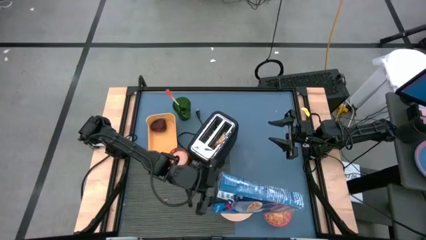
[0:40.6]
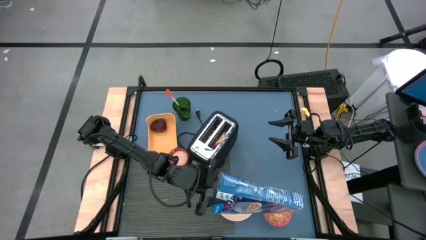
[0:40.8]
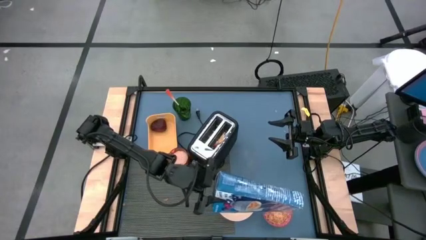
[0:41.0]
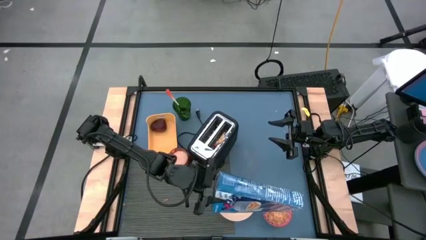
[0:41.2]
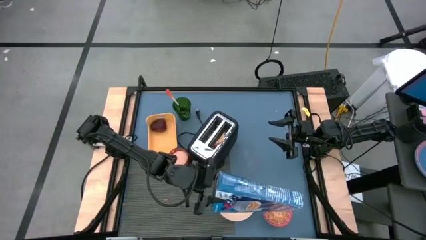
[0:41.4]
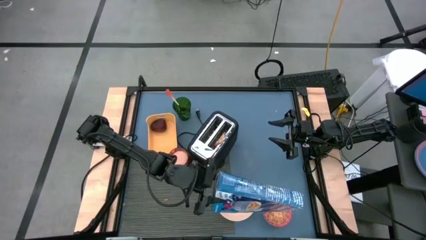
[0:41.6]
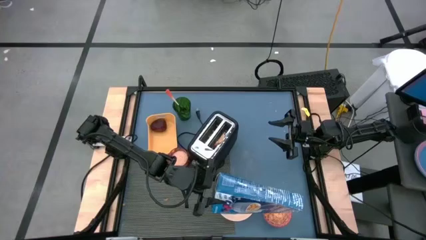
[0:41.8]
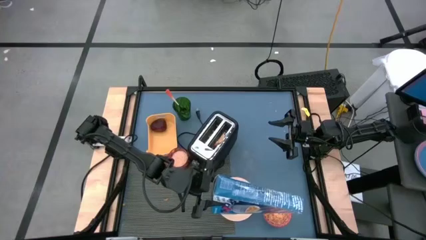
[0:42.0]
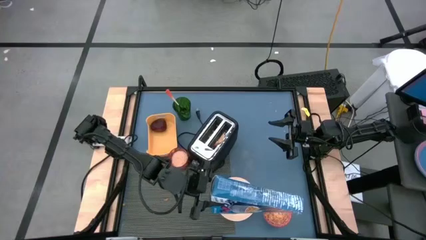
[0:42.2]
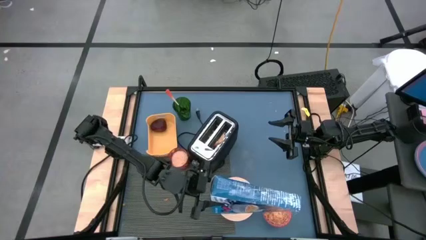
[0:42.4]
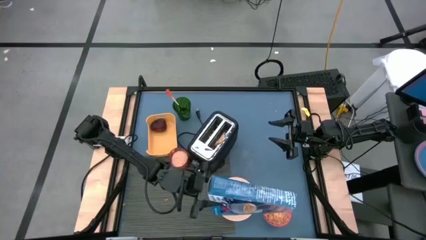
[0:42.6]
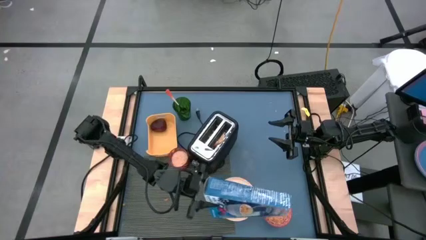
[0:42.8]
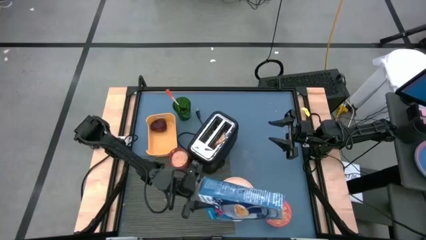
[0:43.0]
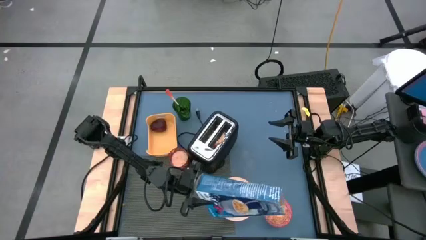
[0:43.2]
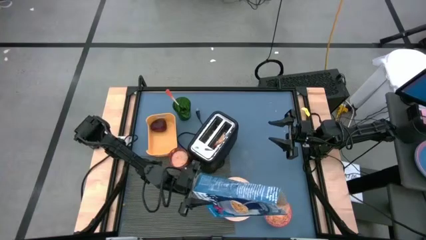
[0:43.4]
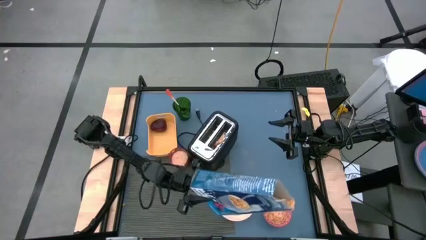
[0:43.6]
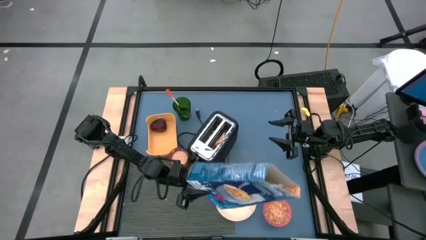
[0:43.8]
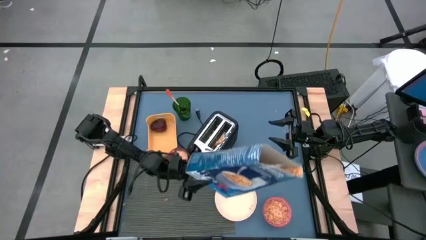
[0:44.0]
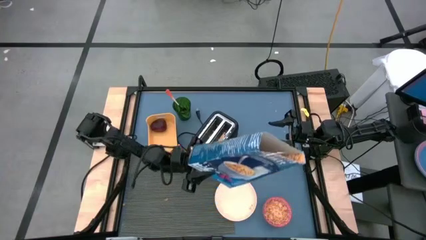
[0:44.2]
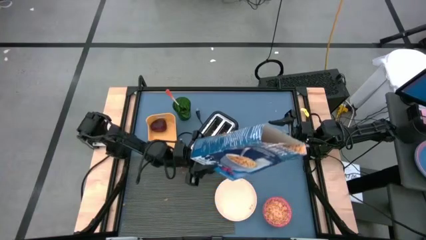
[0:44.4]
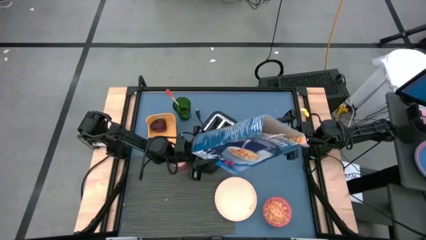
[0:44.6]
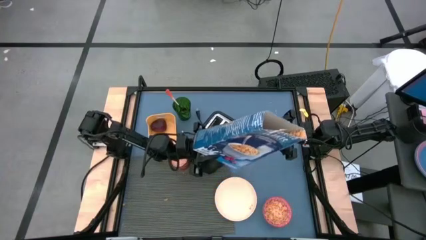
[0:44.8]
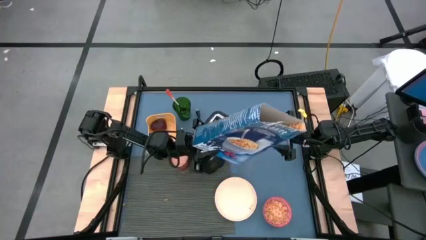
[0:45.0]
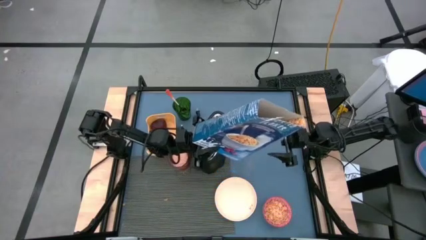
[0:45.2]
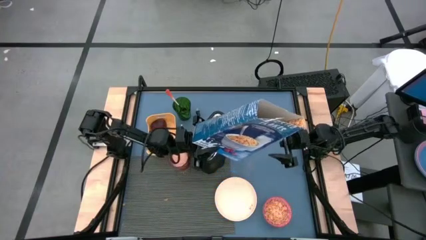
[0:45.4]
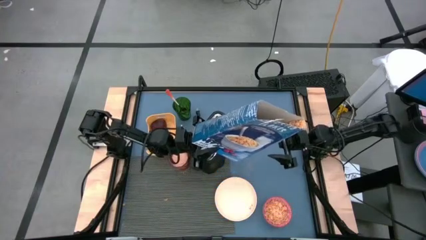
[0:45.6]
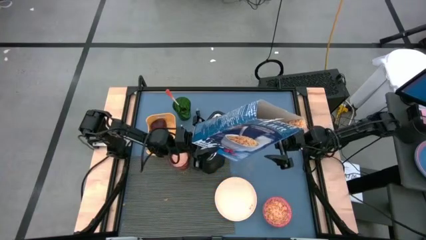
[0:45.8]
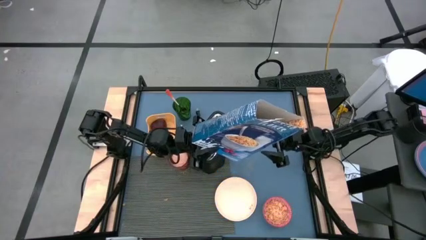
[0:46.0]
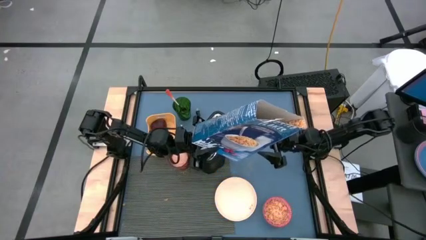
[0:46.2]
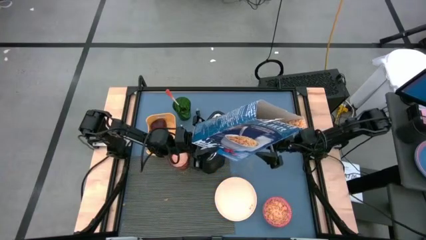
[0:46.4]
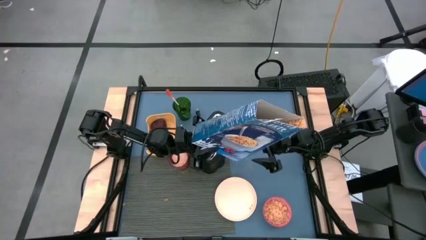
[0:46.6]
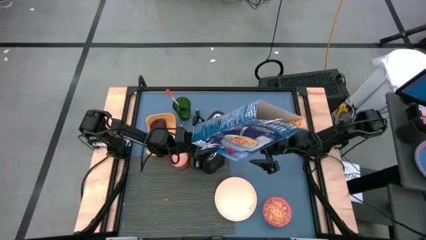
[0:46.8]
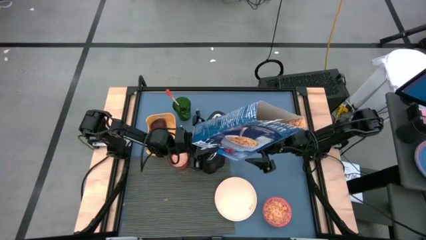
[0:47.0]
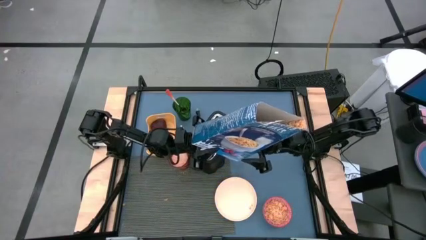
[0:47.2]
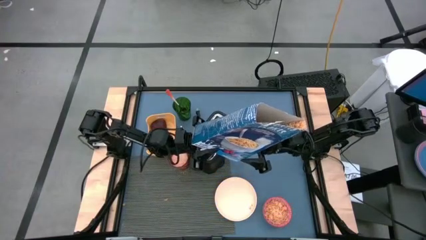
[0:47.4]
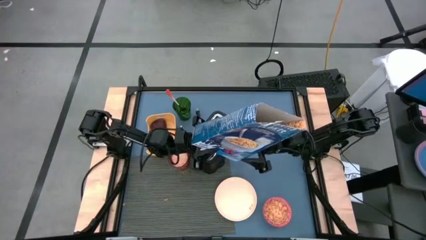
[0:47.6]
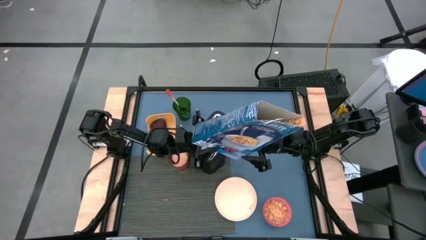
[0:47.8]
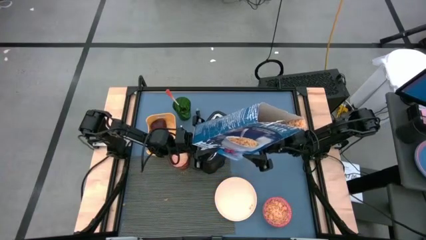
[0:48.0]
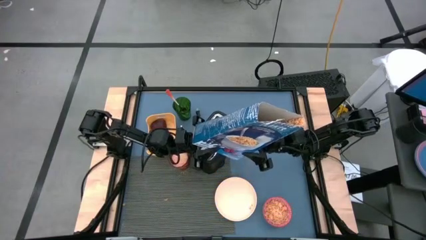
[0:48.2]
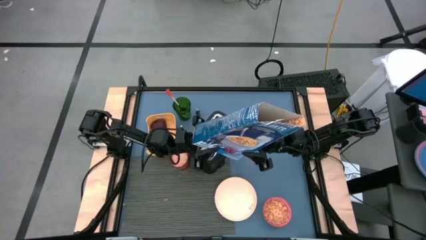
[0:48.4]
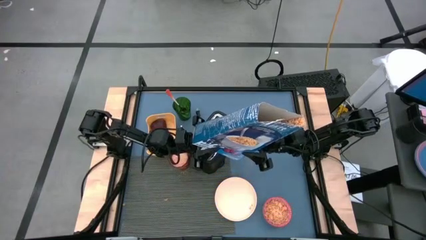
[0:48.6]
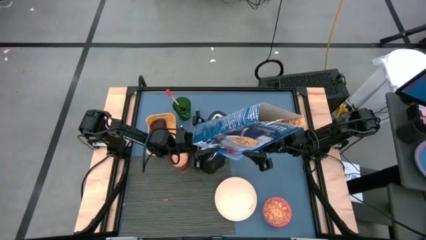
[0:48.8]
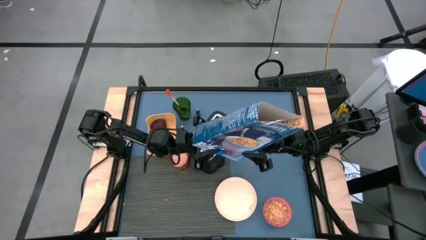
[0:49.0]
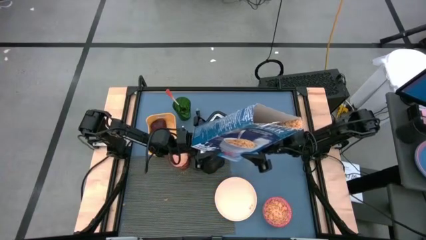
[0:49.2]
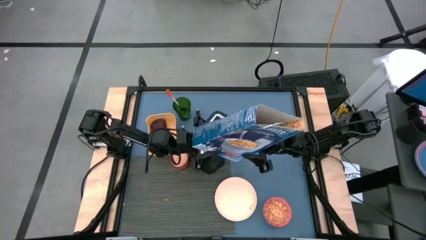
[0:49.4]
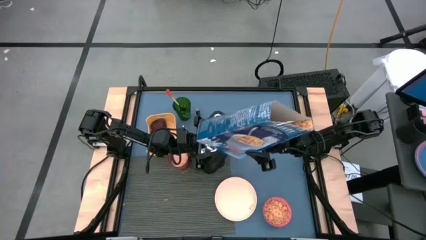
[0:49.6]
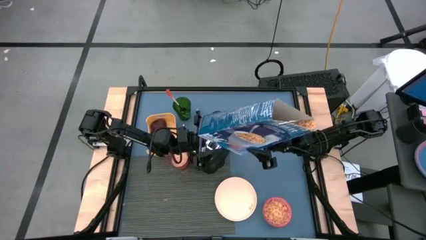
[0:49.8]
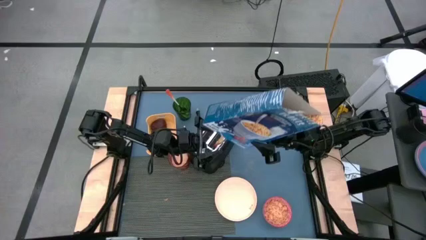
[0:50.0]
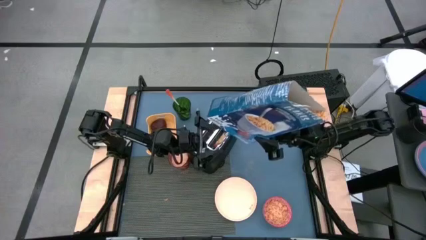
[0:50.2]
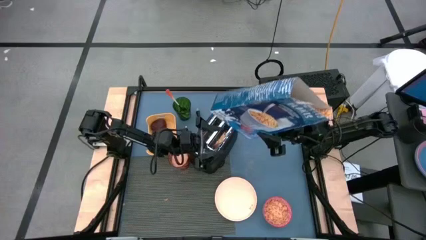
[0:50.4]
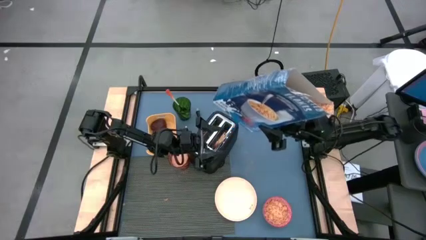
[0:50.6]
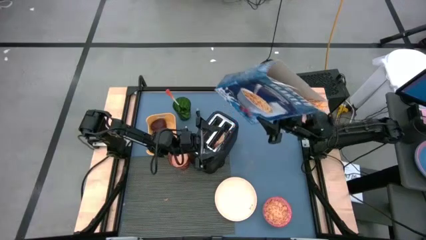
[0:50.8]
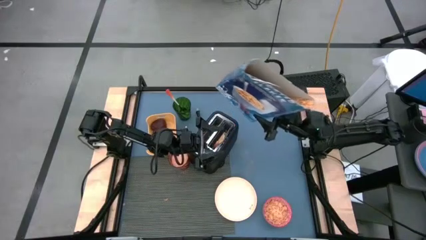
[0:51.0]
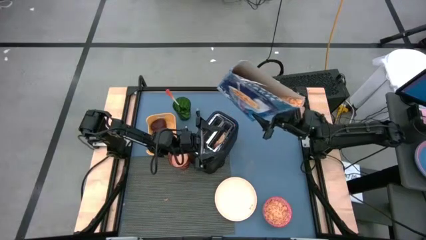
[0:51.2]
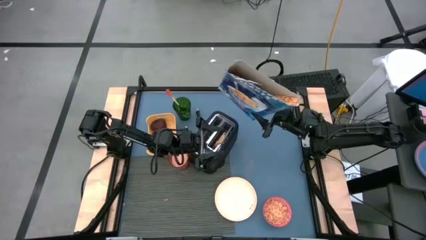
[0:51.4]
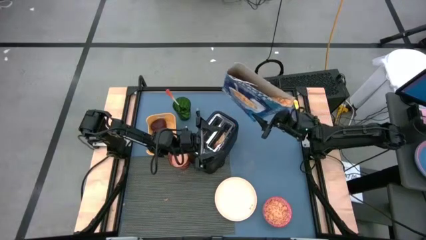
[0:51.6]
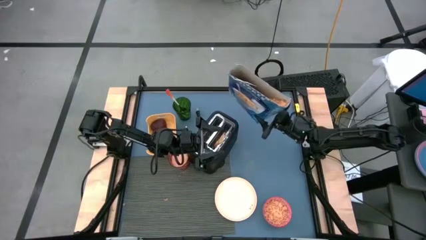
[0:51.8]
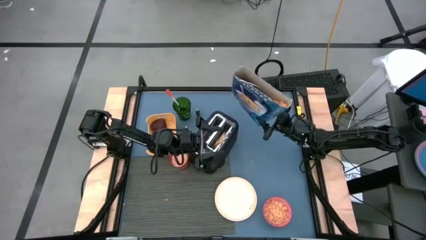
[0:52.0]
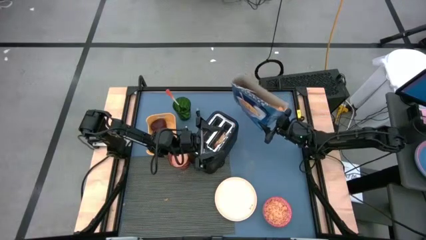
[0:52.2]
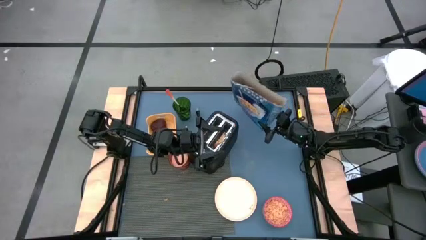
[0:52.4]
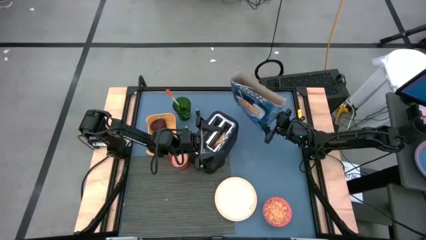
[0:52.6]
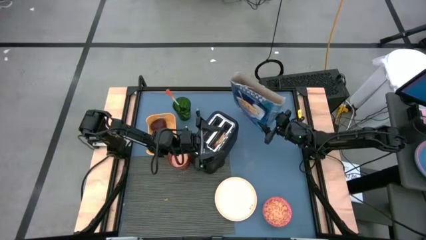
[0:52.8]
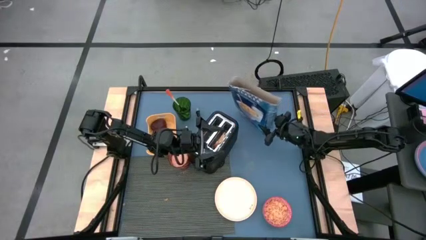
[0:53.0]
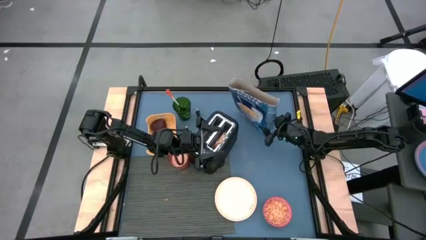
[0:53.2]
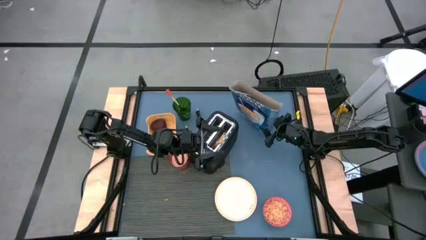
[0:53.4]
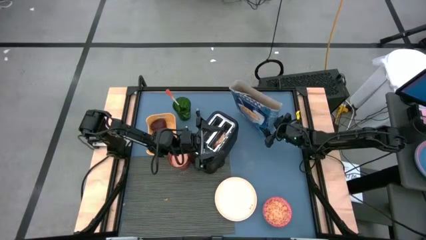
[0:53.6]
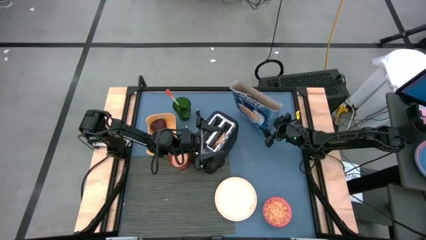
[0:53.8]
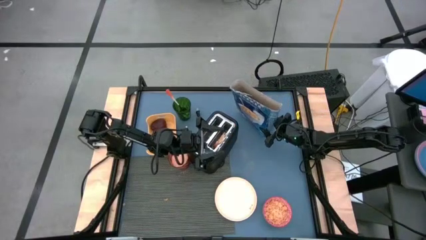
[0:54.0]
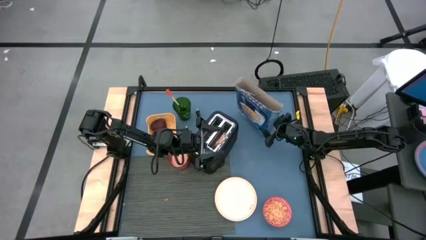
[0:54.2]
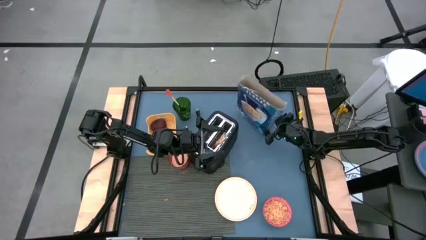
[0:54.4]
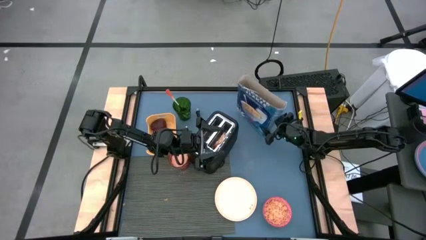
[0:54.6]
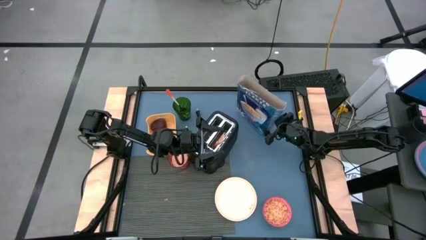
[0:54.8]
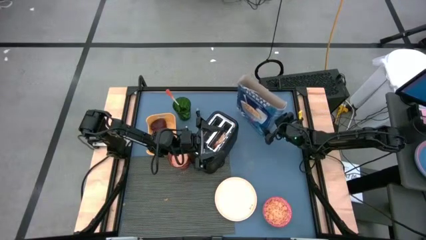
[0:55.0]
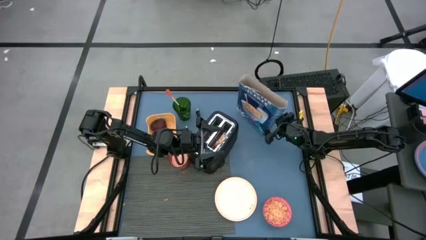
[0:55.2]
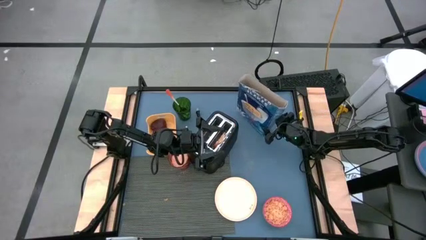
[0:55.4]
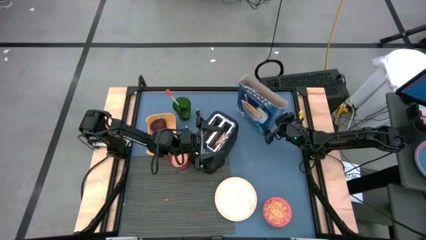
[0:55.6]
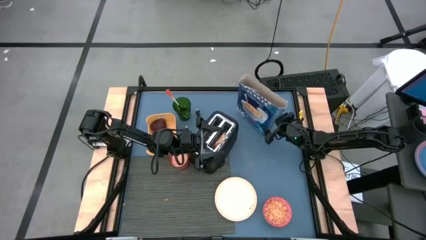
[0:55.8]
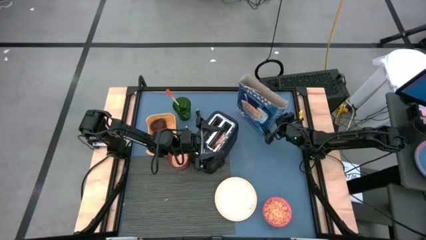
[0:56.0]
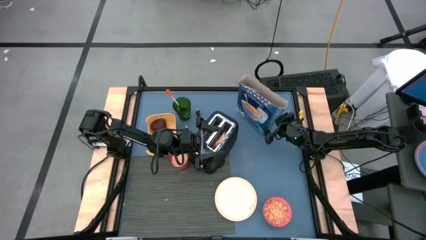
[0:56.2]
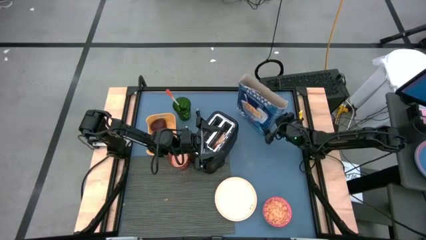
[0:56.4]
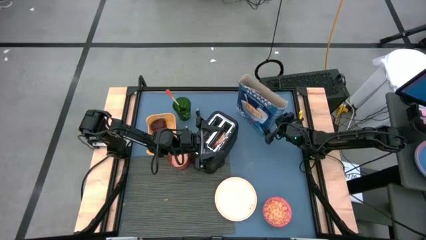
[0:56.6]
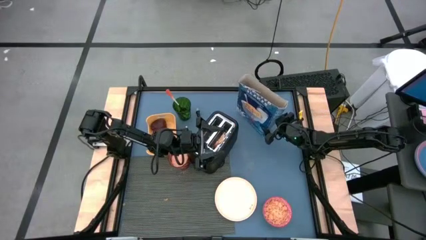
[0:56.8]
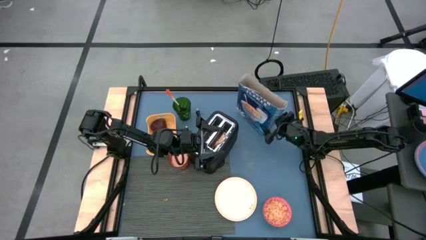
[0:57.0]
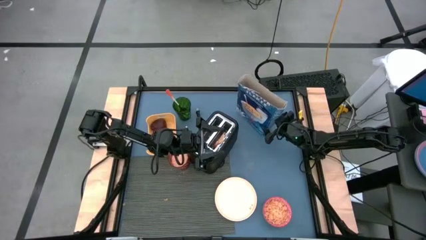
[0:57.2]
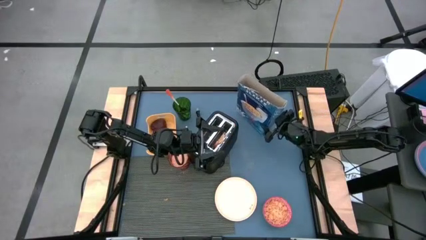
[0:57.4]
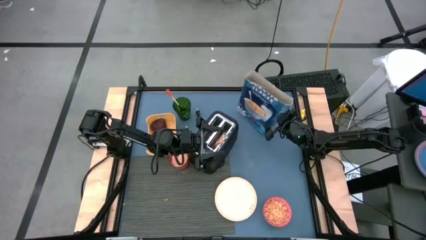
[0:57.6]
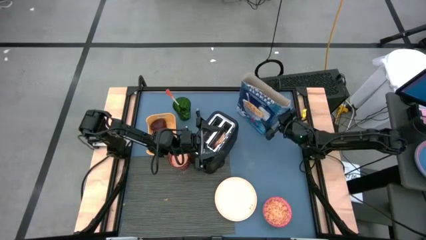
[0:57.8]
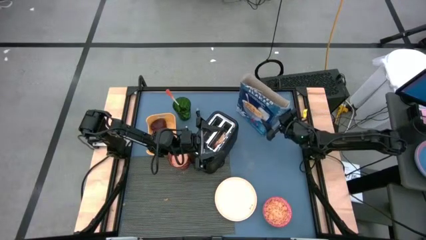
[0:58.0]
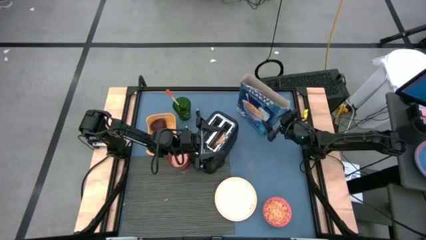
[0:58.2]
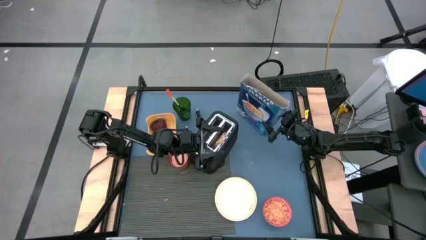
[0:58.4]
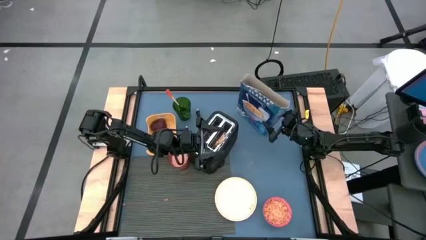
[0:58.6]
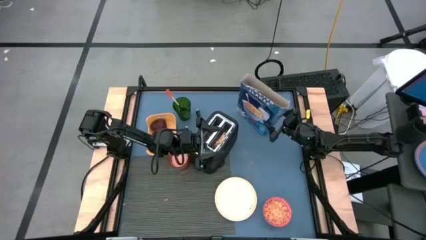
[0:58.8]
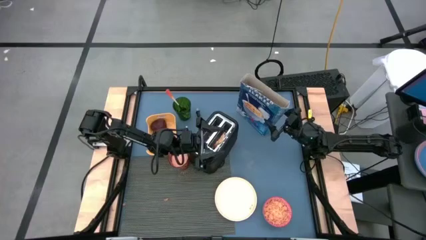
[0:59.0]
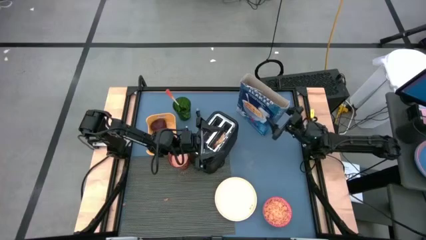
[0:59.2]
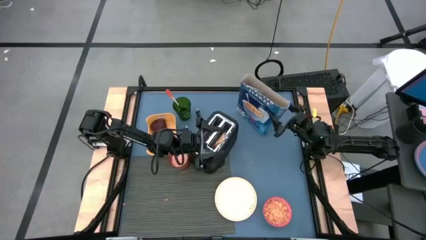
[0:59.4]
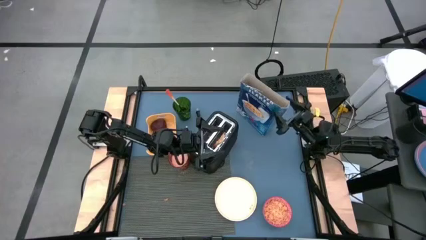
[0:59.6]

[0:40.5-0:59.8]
Task: Arrange a breakfast setting
Put the cereal from the blue cereal box into the red bowl
